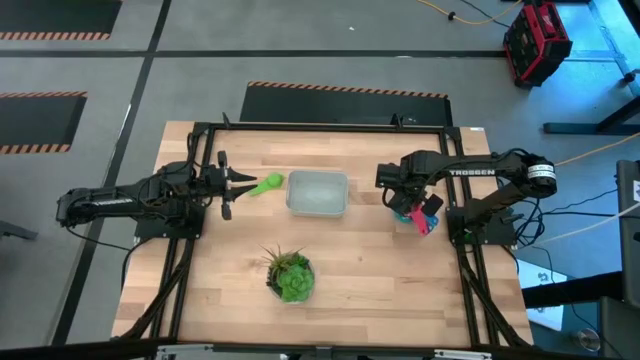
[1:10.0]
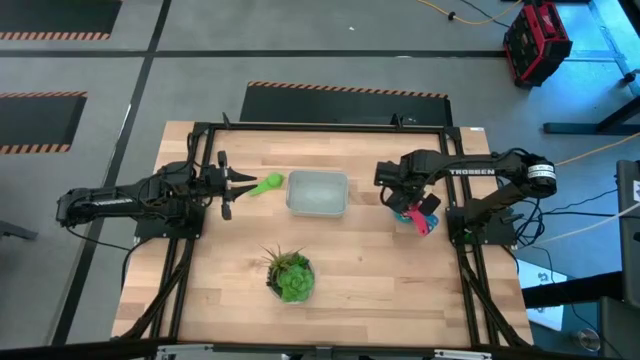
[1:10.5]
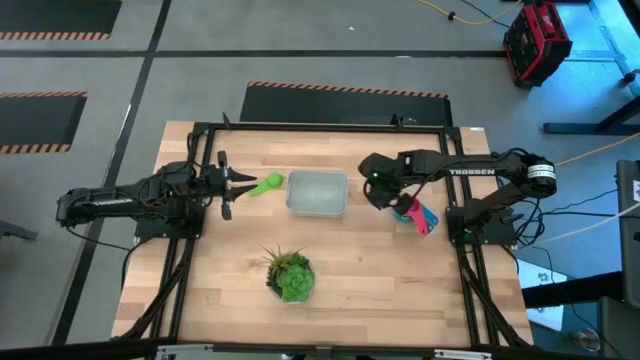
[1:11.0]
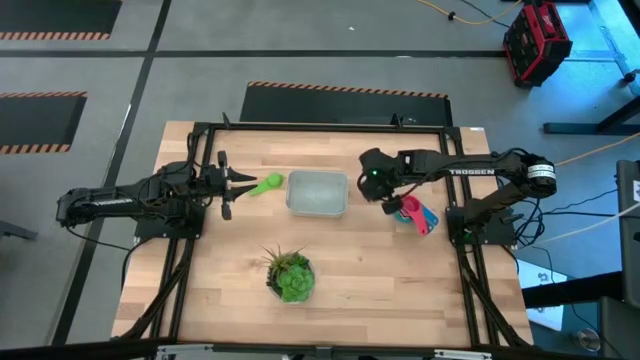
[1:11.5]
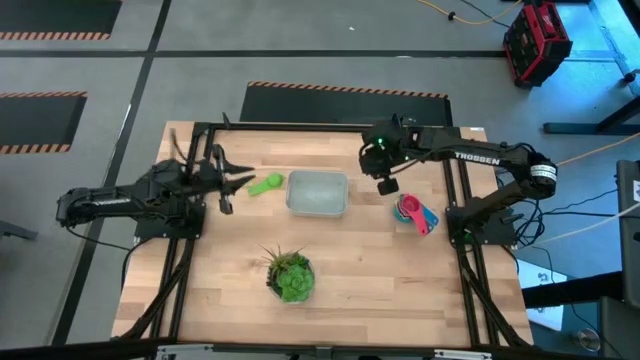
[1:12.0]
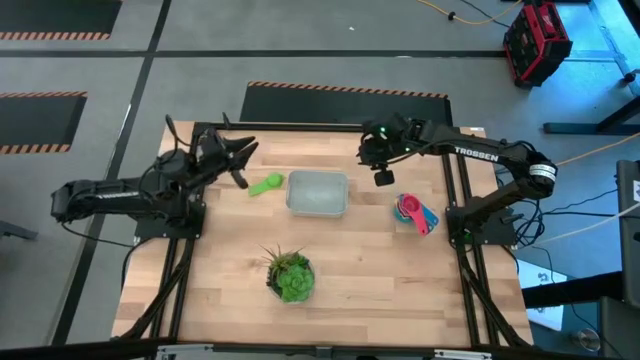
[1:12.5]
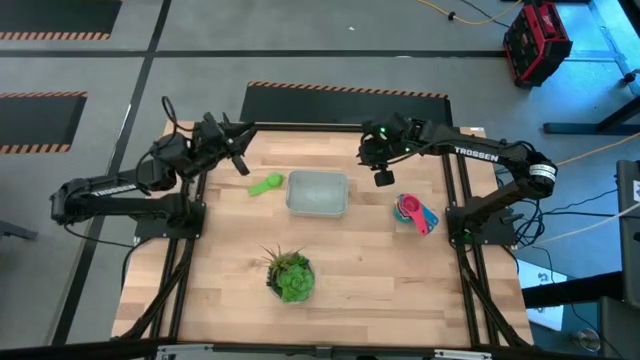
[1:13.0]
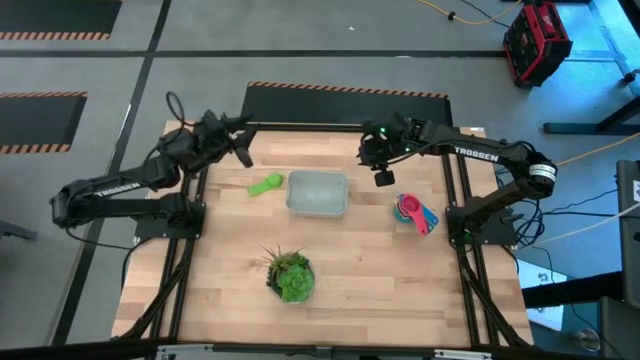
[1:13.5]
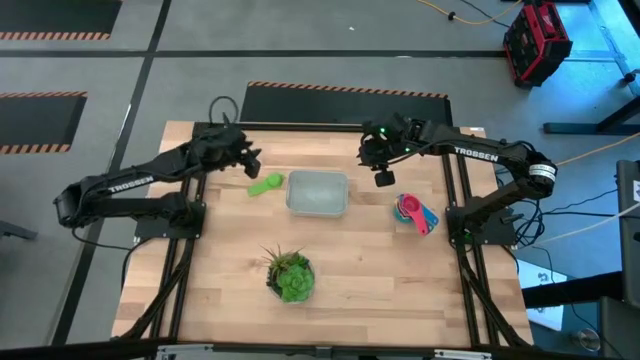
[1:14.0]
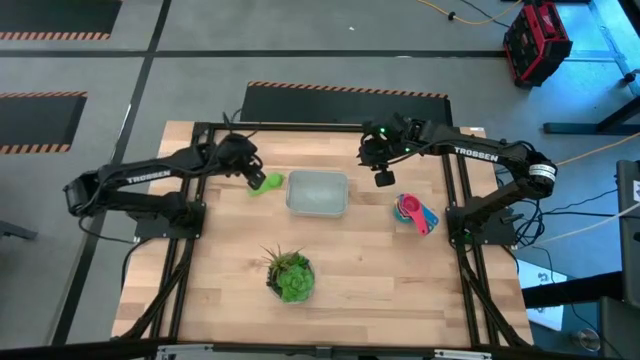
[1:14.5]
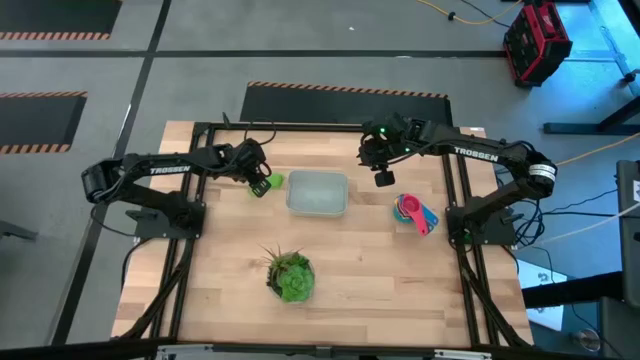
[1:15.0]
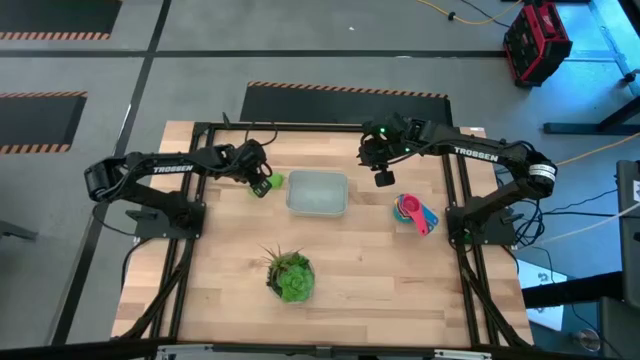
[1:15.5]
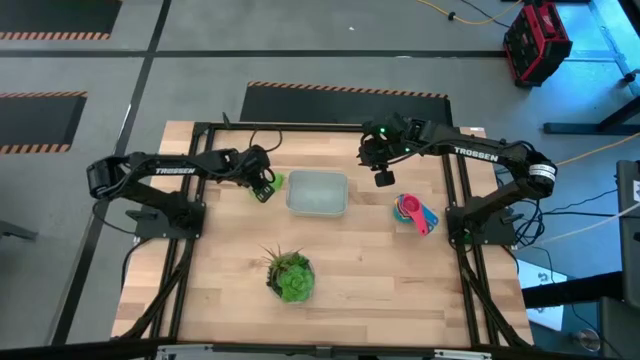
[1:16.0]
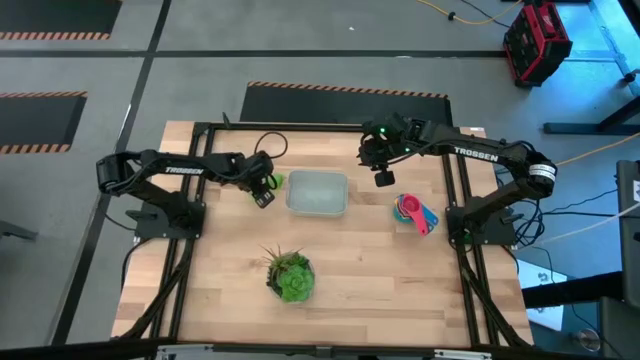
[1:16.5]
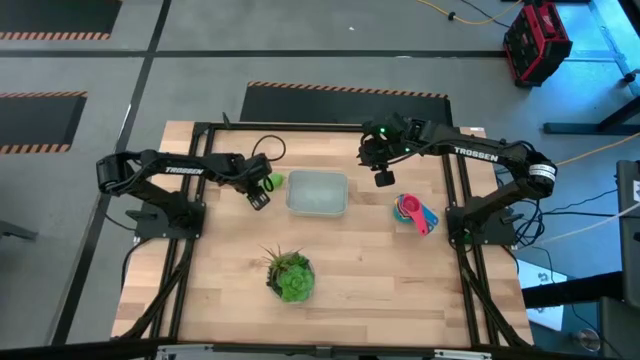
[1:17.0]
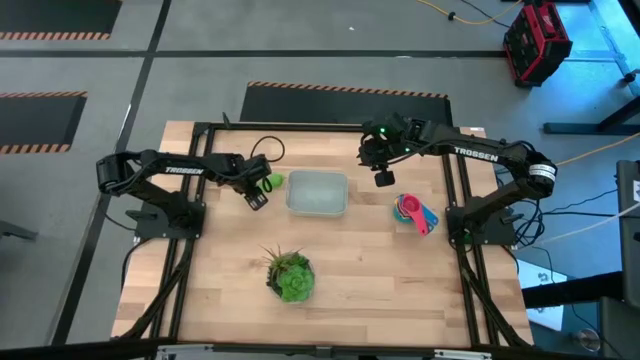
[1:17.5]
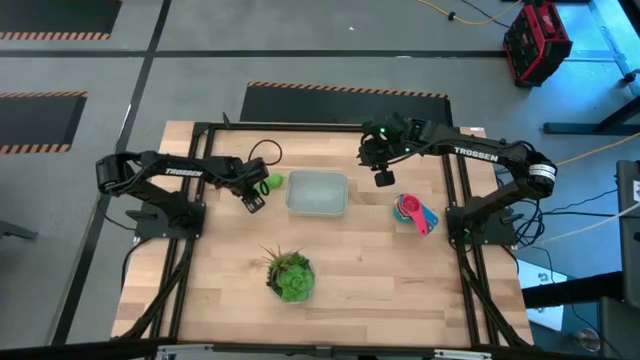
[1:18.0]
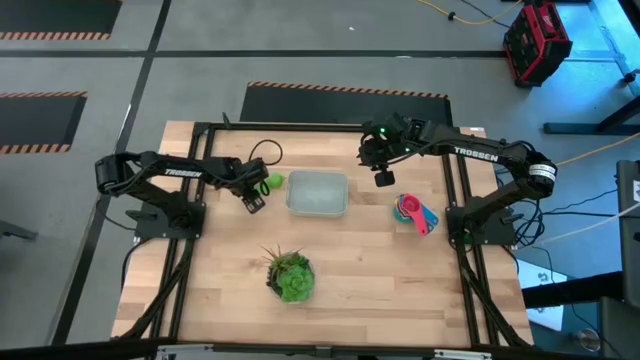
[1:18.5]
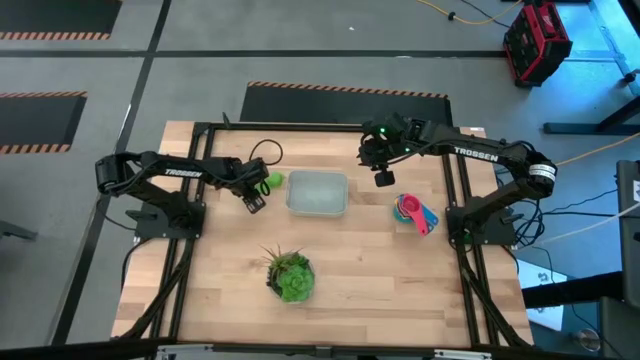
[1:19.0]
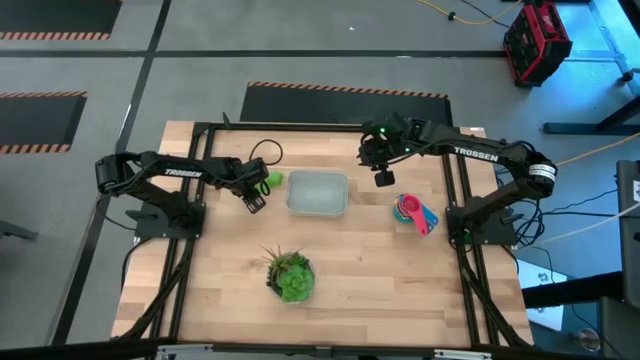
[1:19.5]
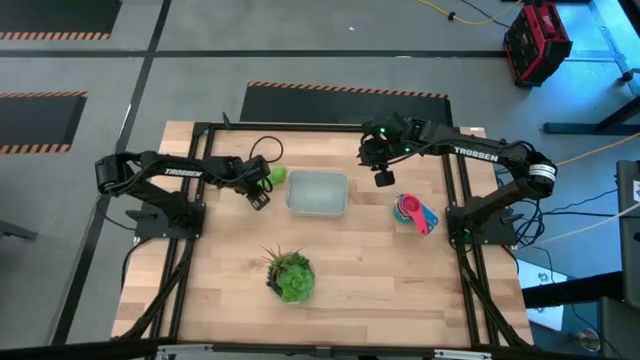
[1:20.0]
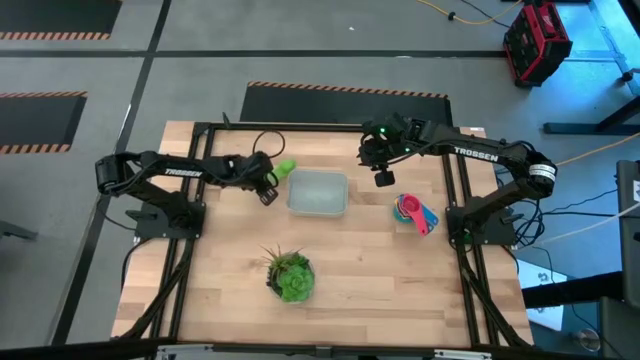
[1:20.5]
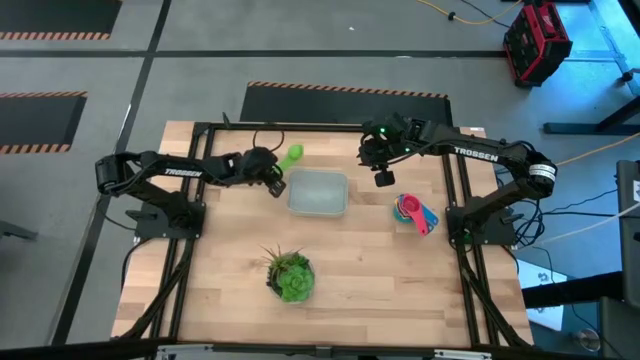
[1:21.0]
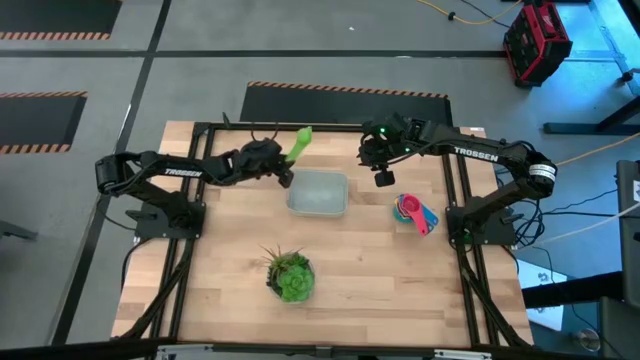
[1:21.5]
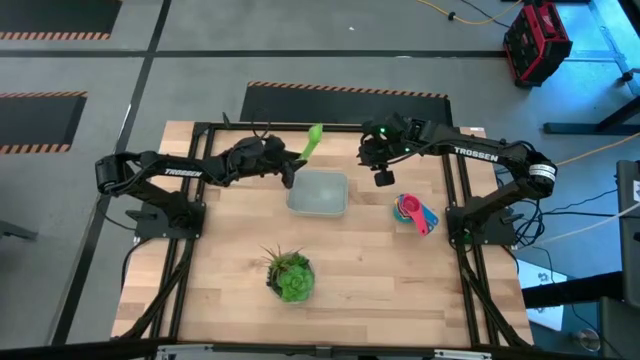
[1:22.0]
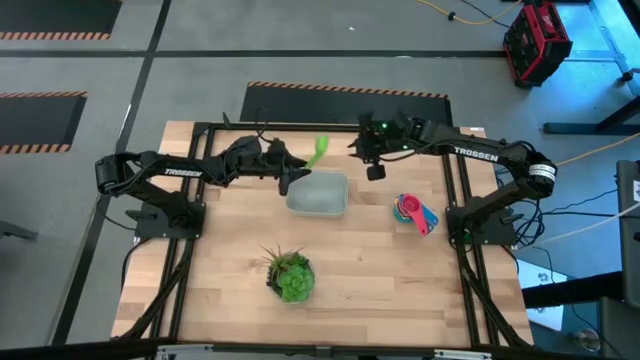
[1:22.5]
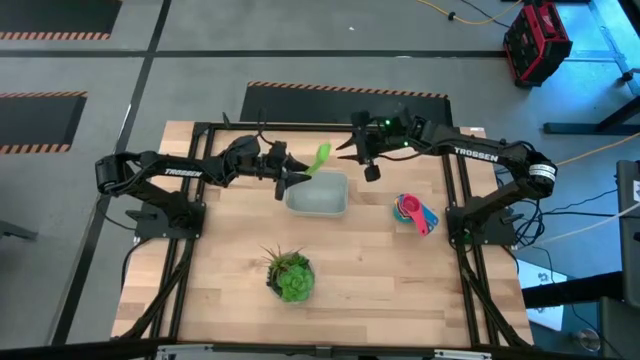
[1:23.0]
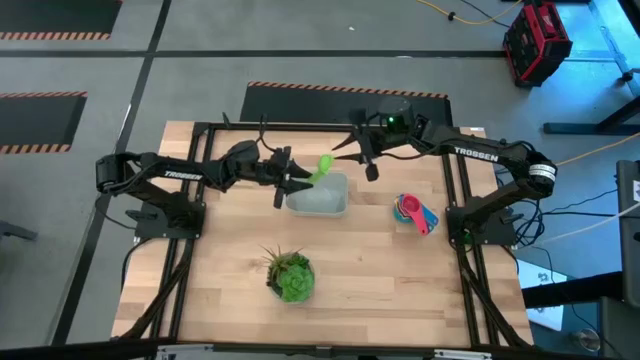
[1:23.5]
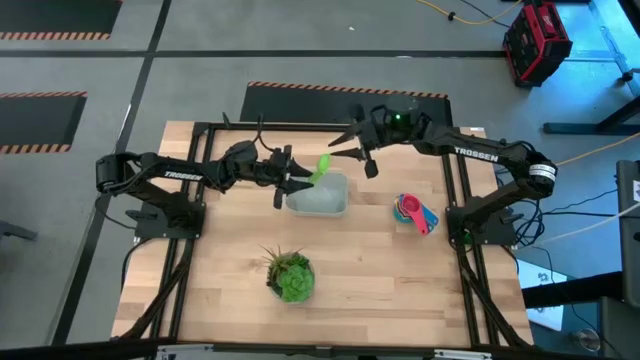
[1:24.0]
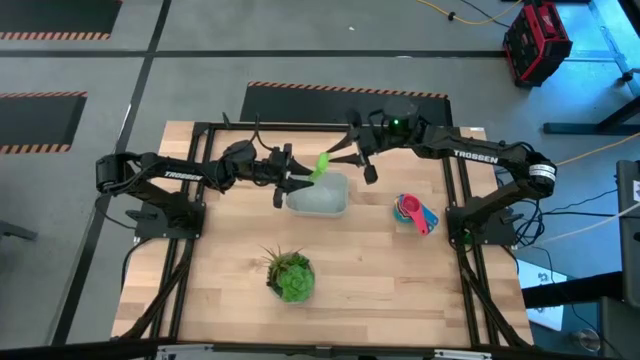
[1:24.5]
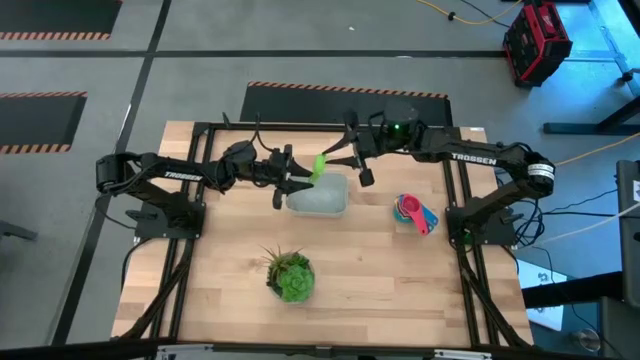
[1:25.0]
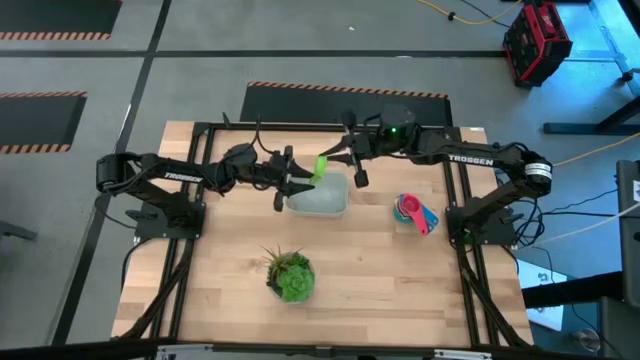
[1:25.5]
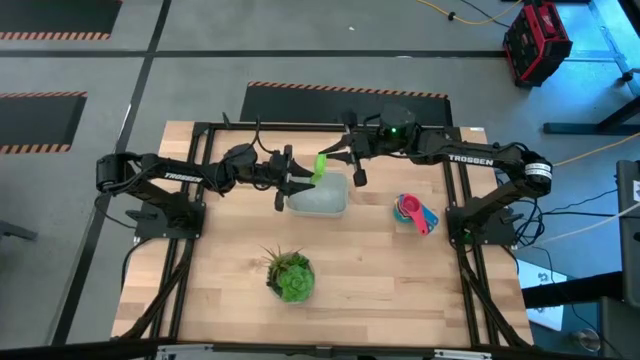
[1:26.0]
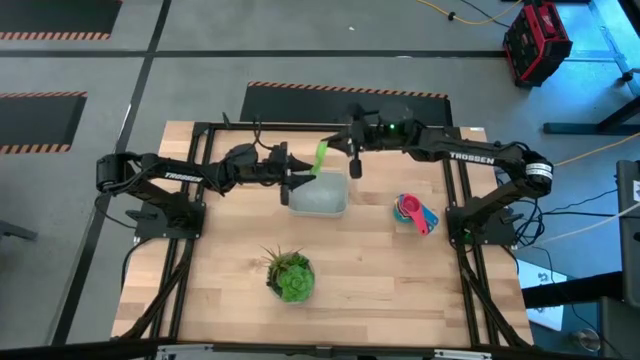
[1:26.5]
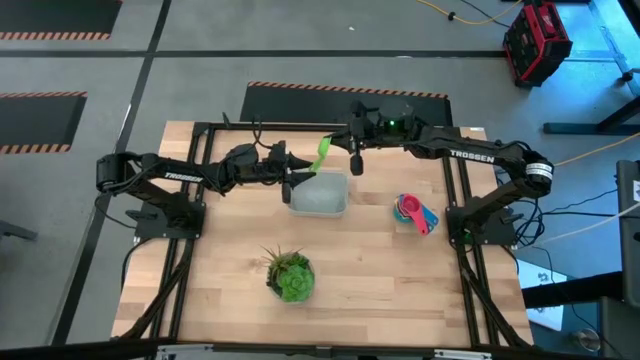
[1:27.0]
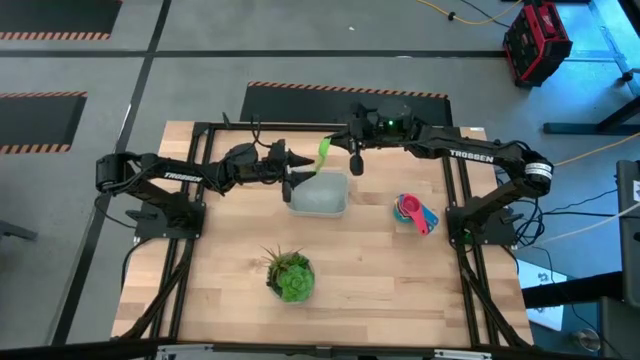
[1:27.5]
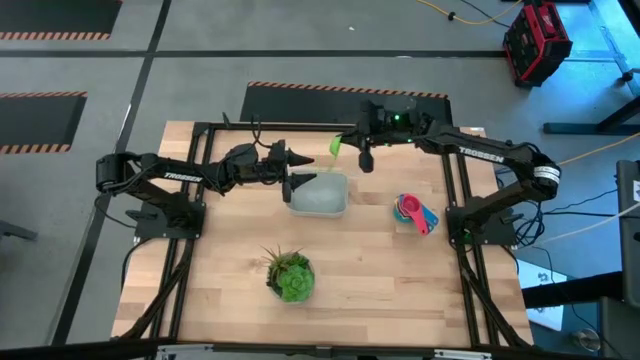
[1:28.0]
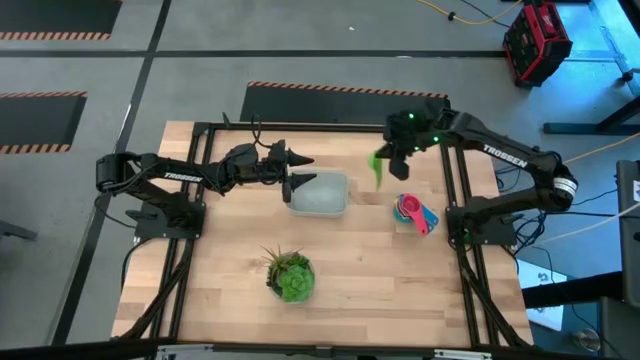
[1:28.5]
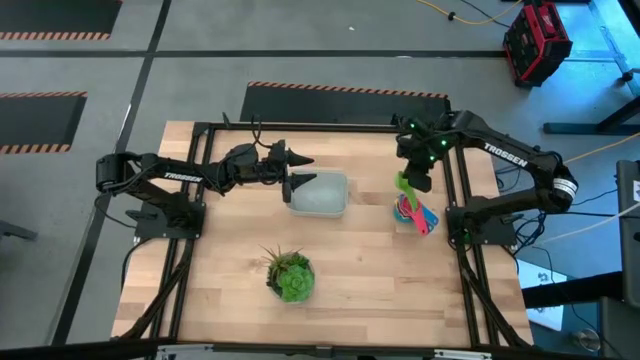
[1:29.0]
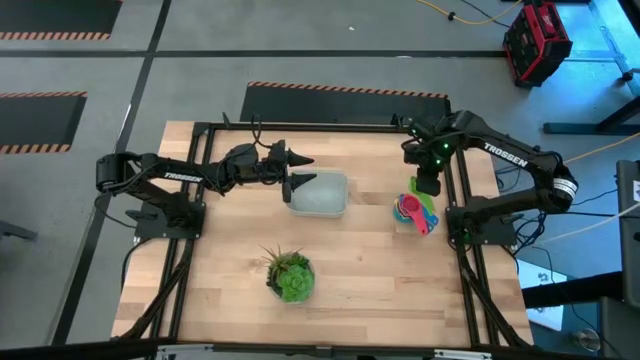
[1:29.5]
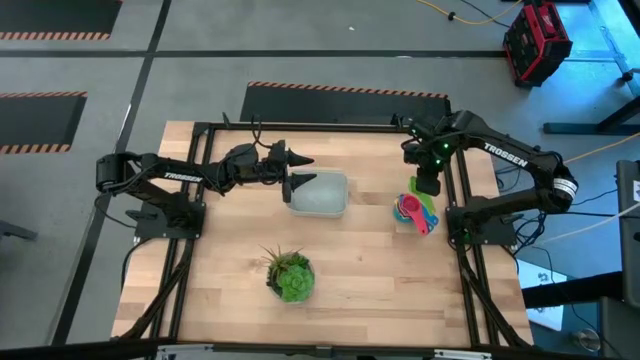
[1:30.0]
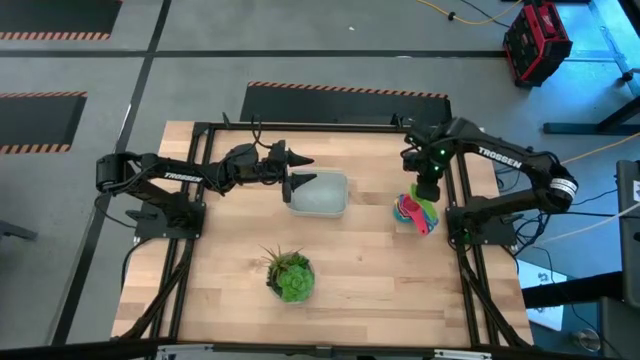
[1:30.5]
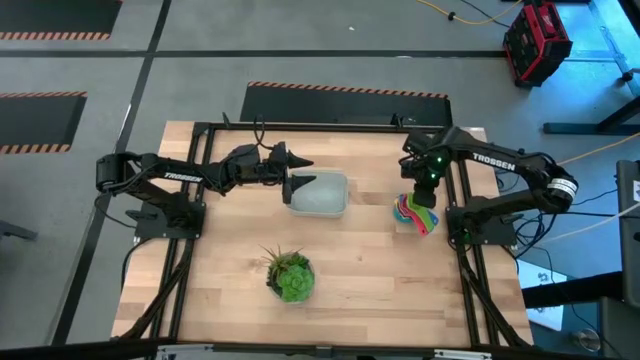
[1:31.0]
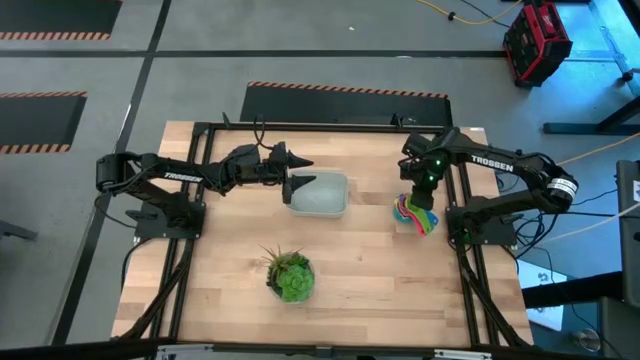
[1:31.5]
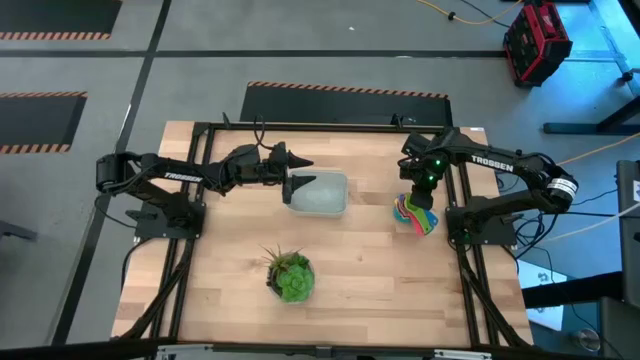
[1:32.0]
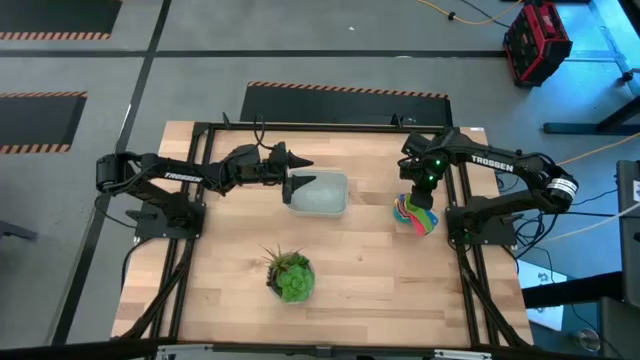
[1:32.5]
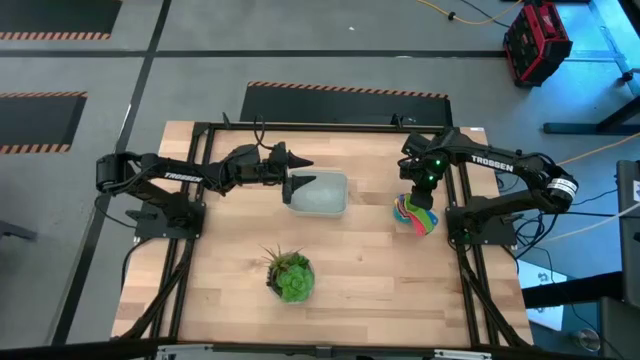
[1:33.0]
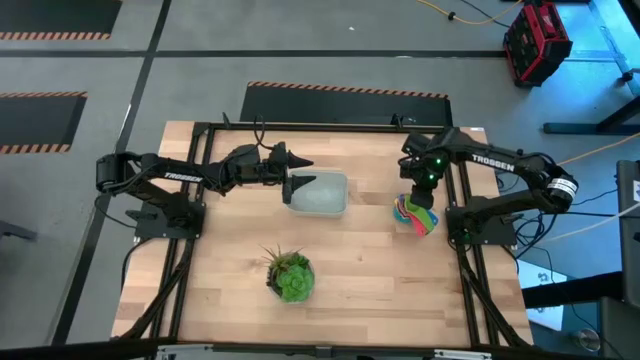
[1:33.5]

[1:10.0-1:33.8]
Task: Nest measuring cups in basket
Stack the green measuring cup on top of the the red measuring cup
